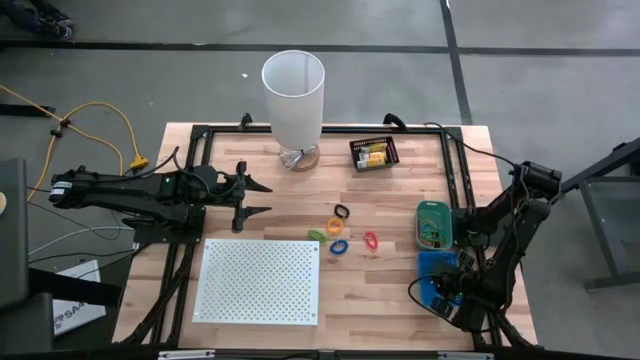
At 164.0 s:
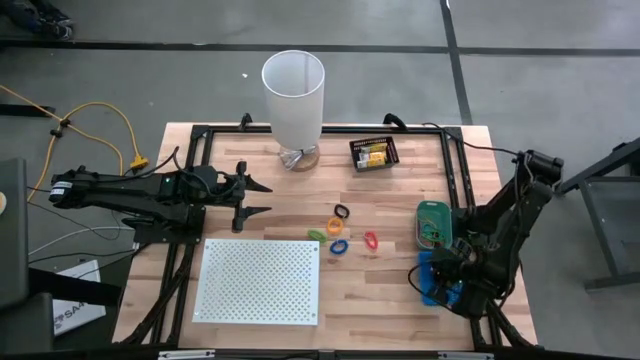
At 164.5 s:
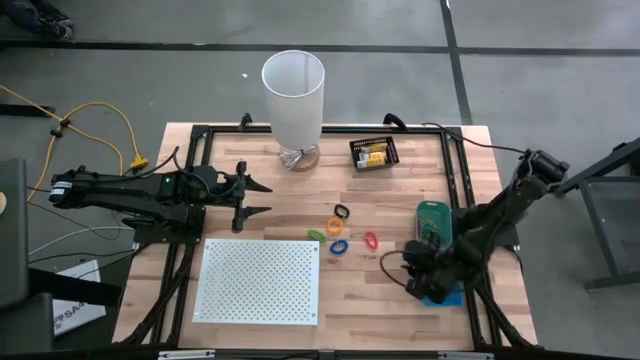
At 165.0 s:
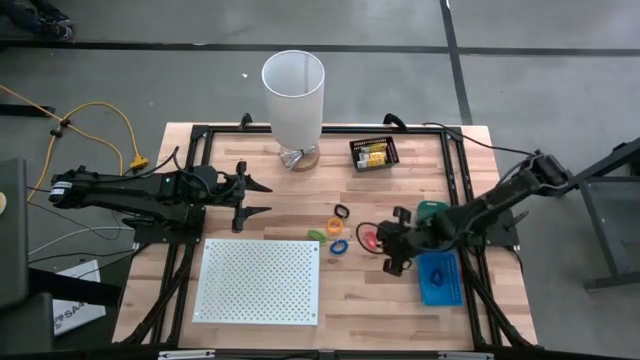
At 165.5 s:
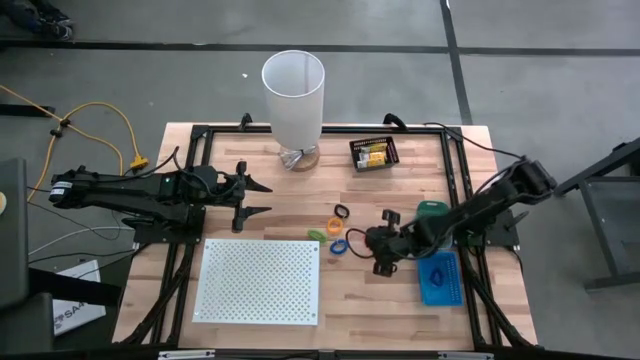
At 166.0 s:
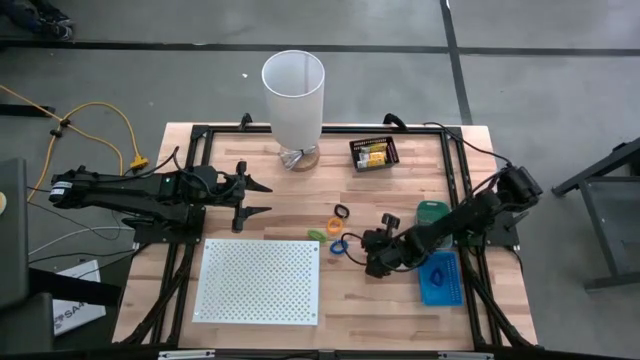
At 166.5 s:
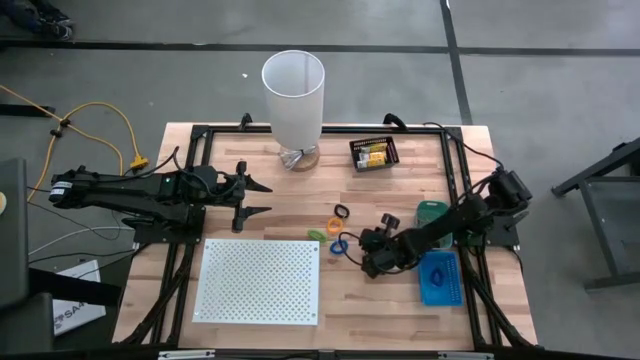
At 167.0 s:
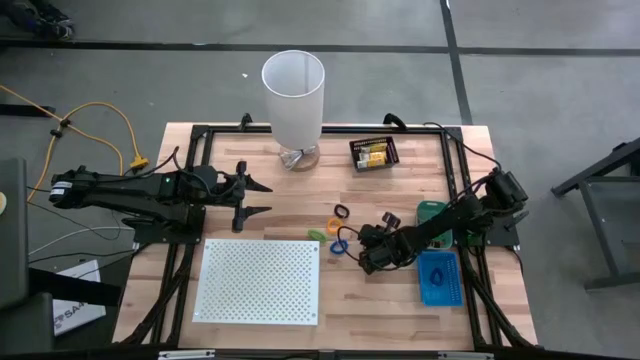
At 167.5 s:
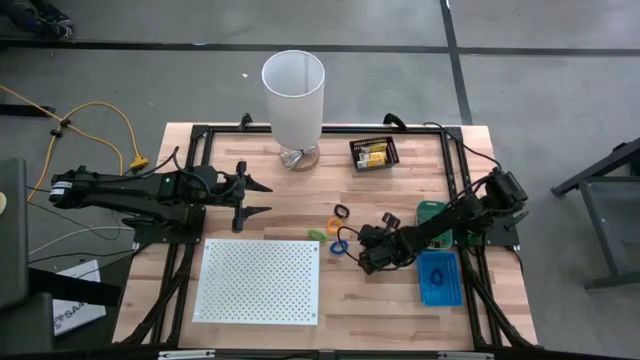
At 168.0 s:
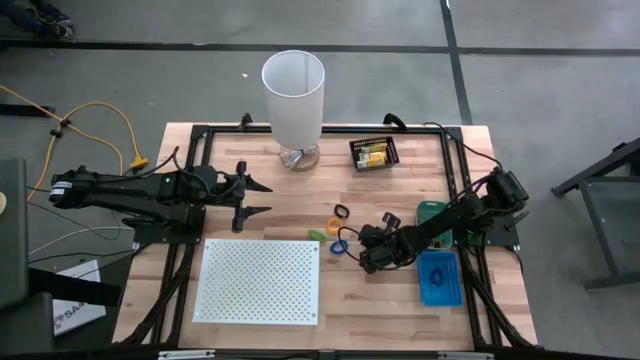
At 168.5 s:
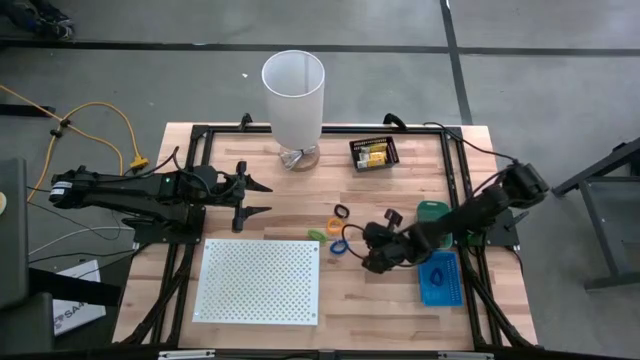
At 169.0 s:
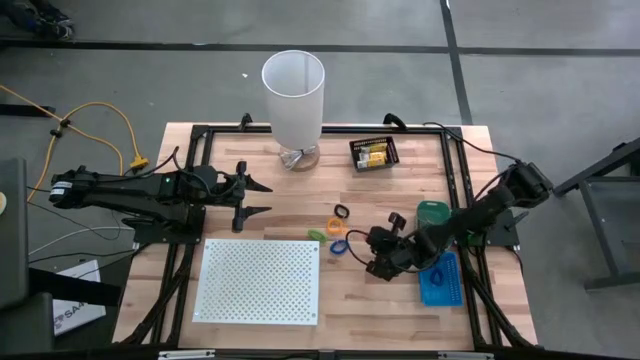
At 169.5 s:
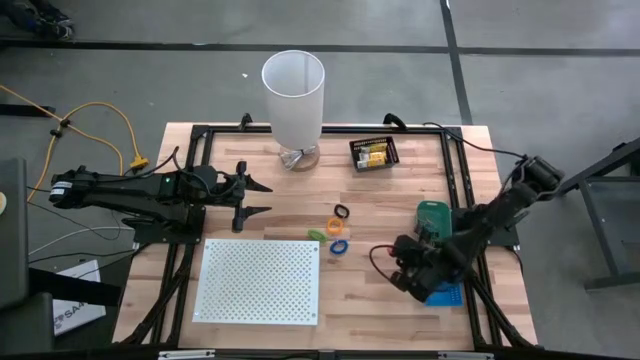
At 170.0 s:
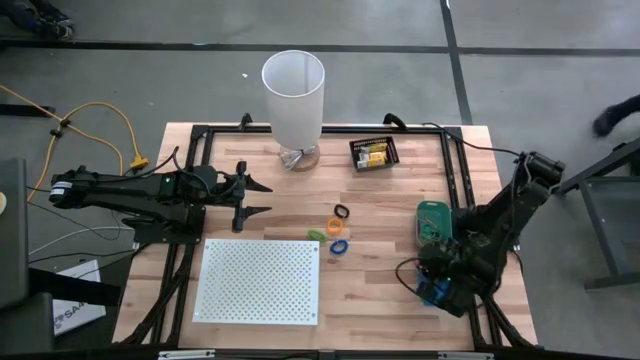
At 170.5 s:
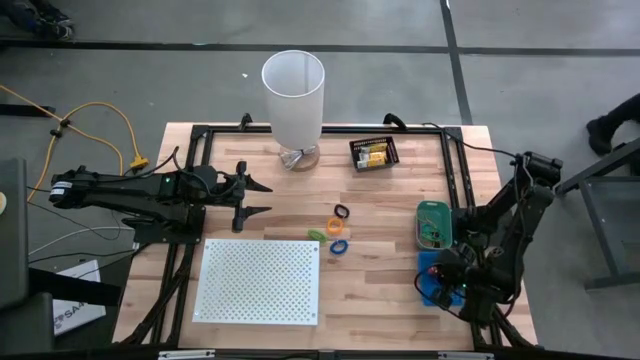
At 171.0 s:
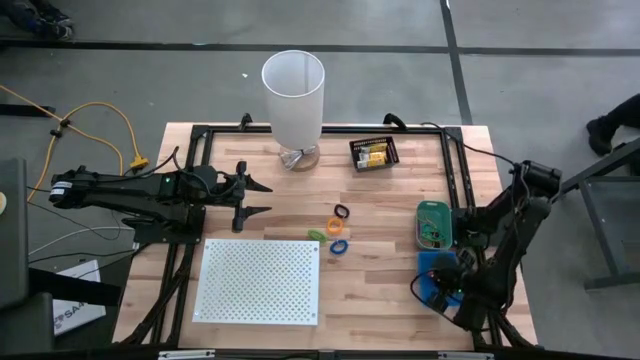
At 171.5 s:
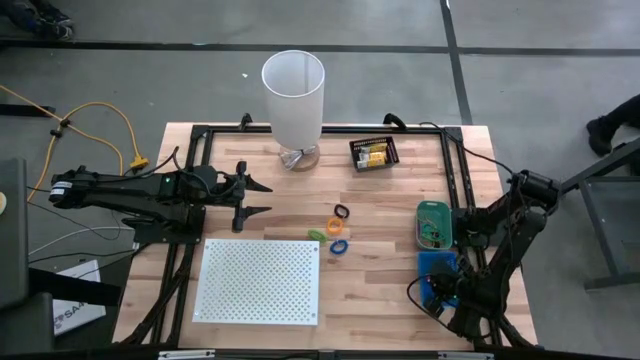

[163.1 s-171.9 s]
Task: Pick & Place Office Desk Supplies
Put the orange spring keychain into the blue bin

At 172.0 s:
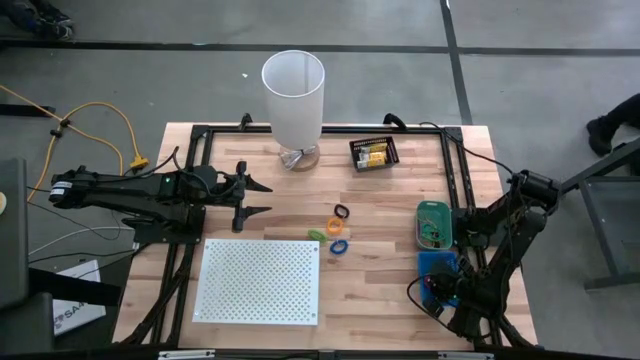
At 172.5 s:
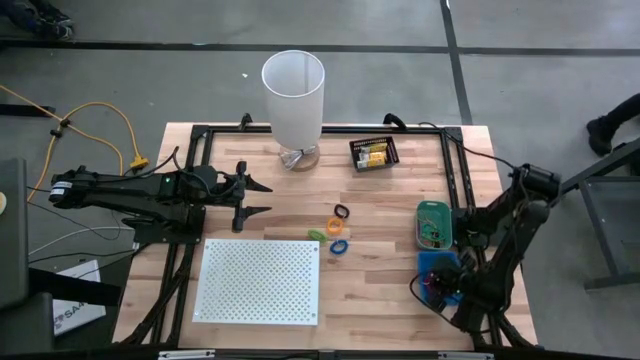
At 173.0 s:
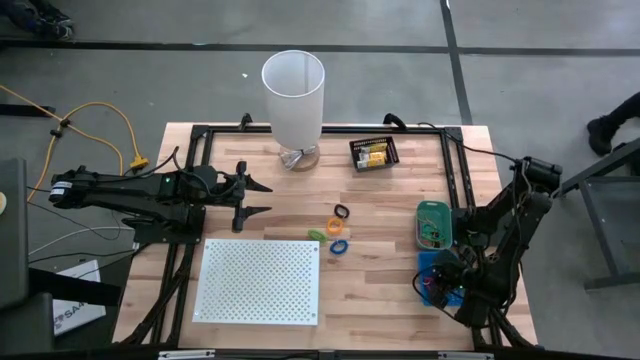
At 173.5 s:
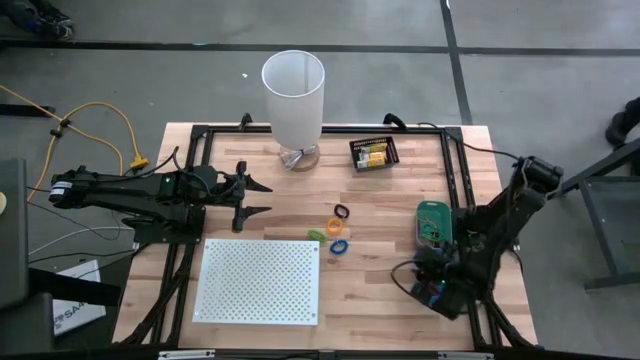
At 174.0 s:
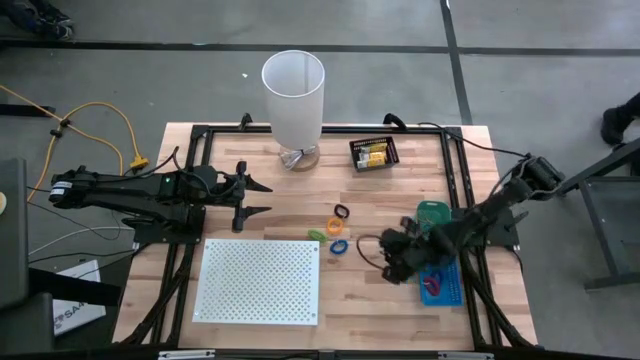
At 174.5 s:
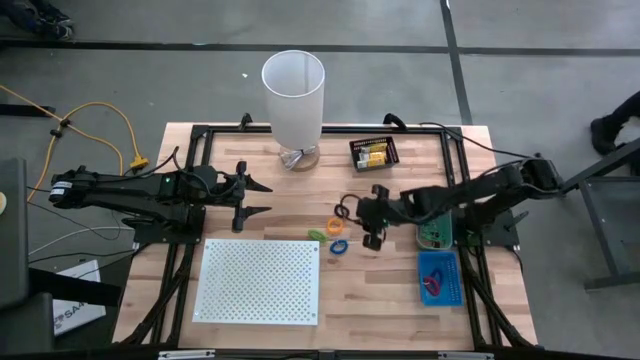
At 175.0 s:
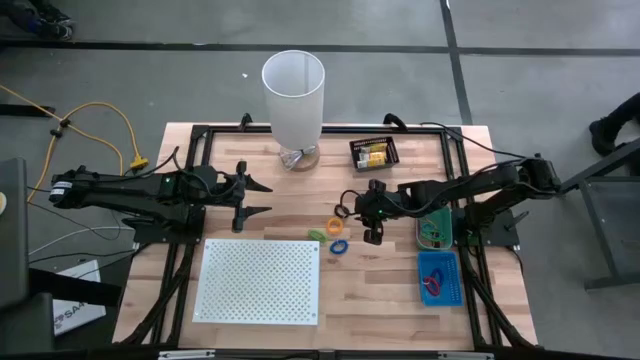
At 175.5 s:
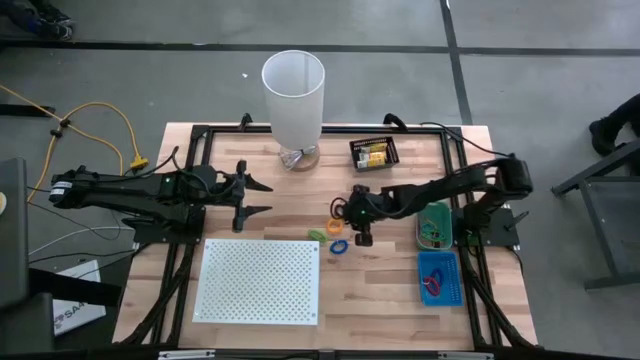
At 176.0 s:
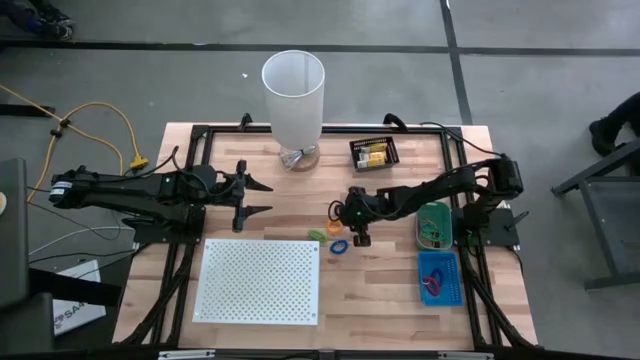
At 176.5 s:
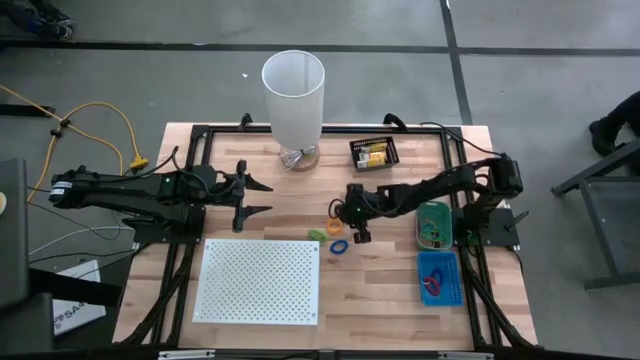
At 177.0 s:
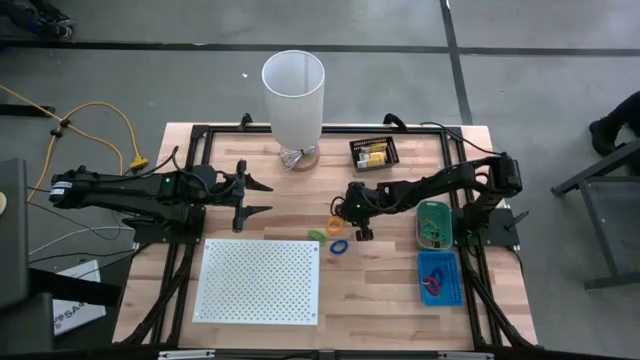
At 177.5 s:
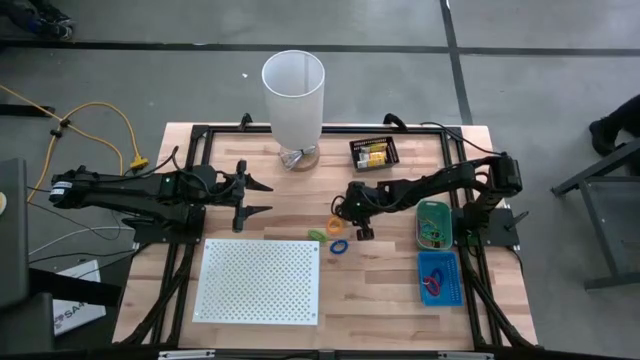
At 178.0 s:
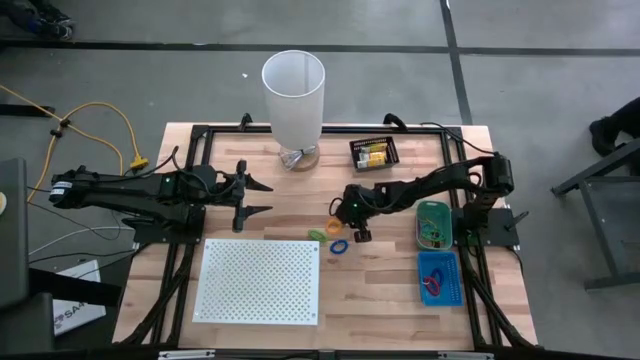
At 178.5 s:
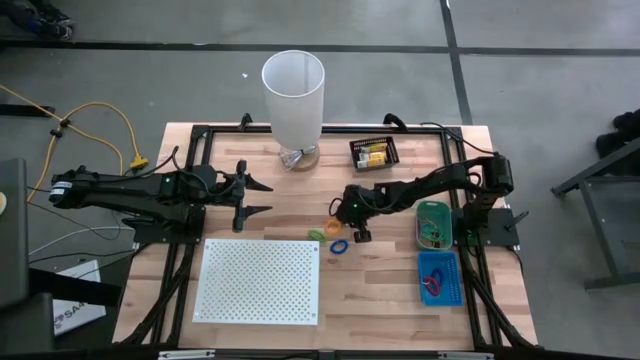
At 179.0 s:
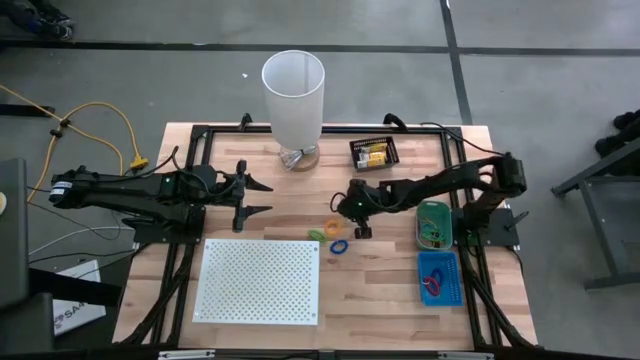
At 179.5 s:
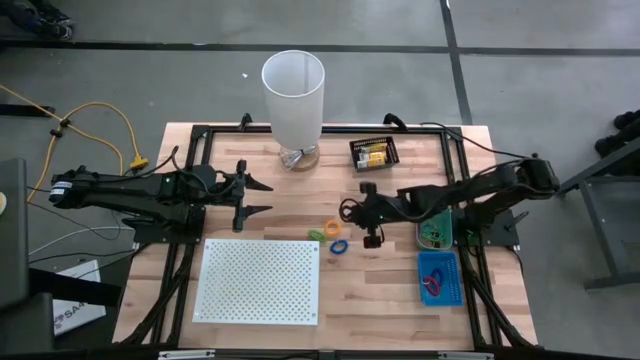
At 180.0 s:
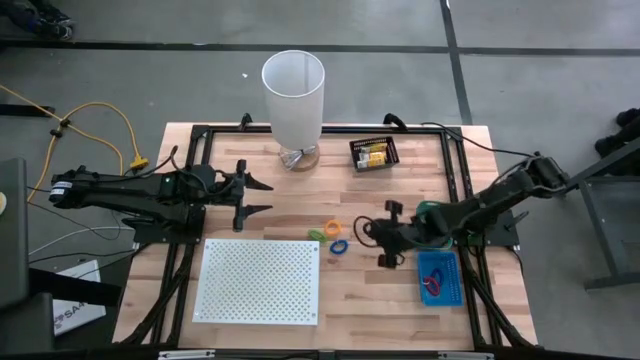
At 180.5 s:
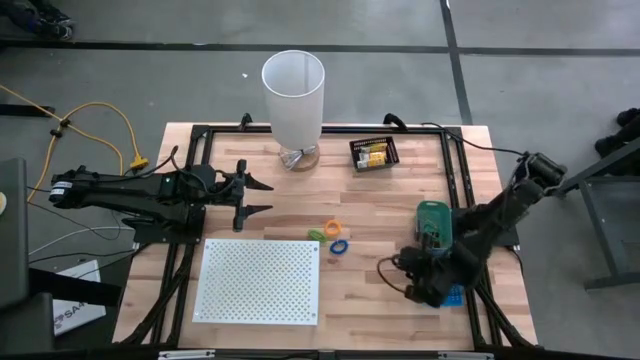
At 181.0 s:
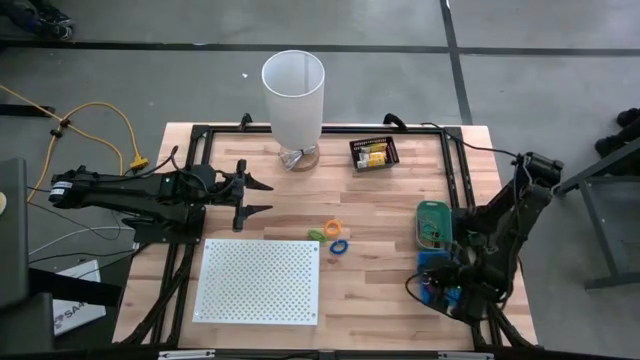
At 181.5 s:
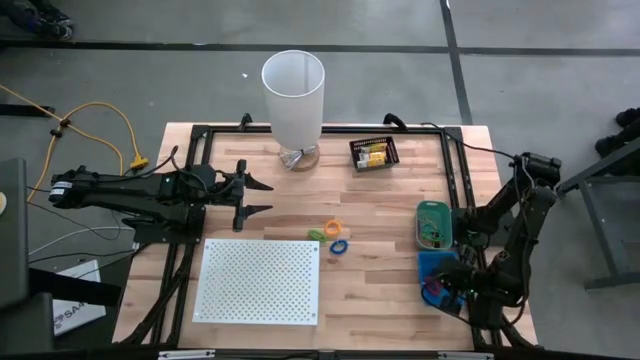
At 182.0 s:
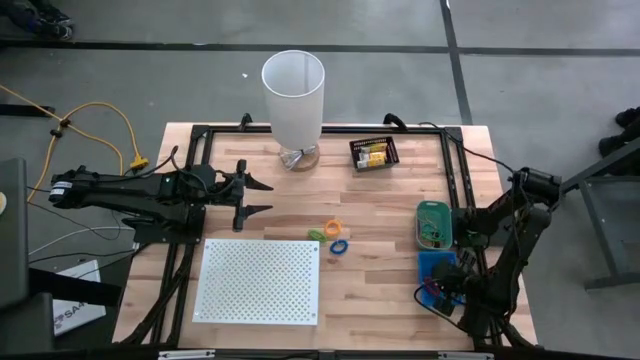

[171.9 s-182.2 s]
Put the black spring keychain into the blue bin

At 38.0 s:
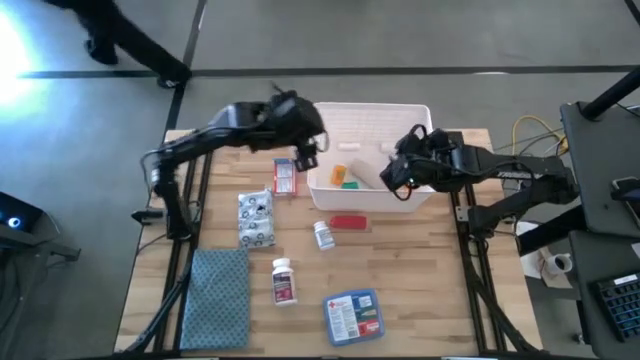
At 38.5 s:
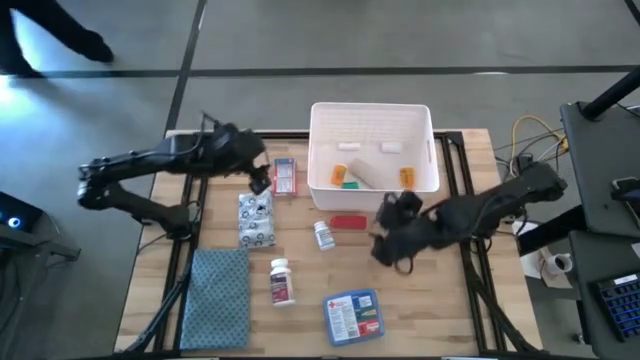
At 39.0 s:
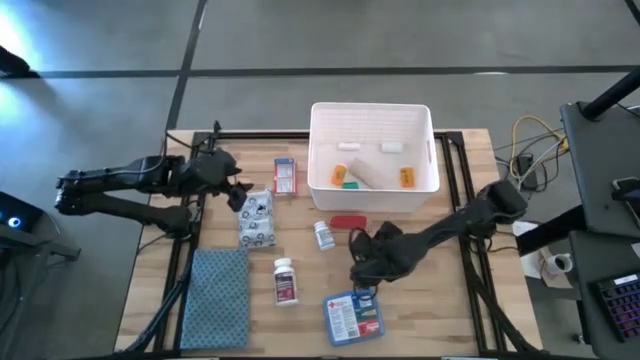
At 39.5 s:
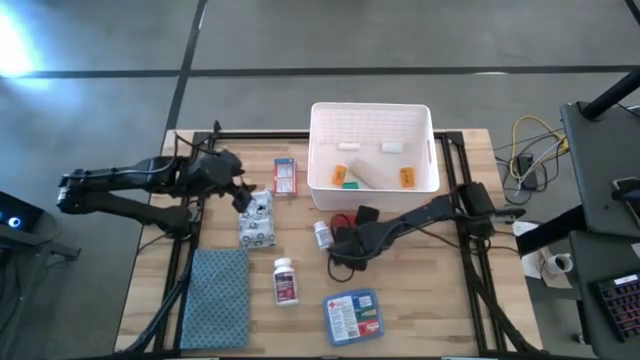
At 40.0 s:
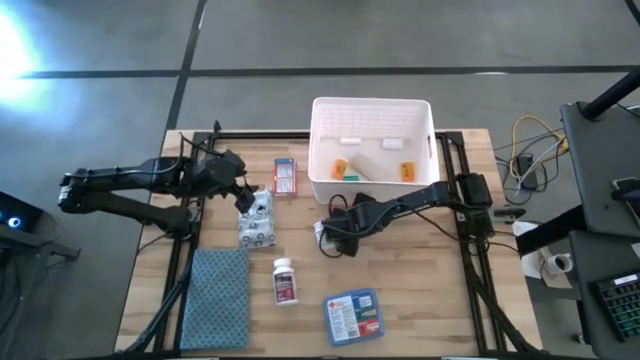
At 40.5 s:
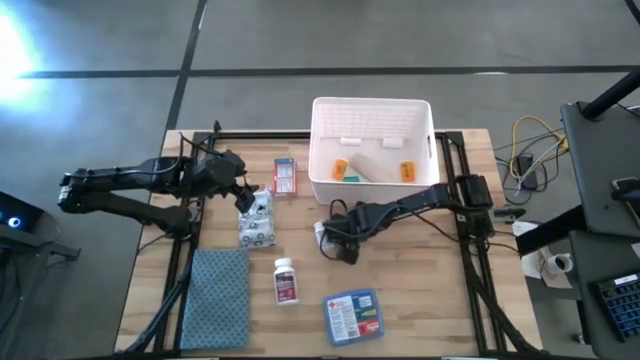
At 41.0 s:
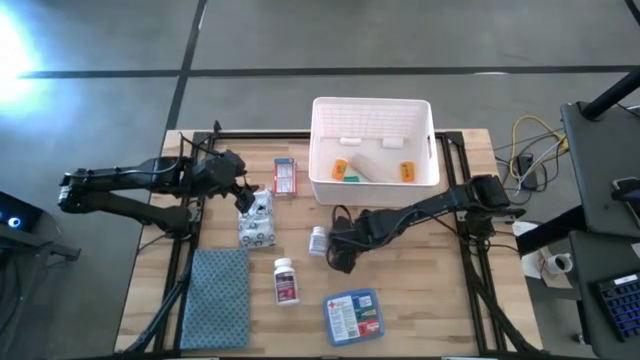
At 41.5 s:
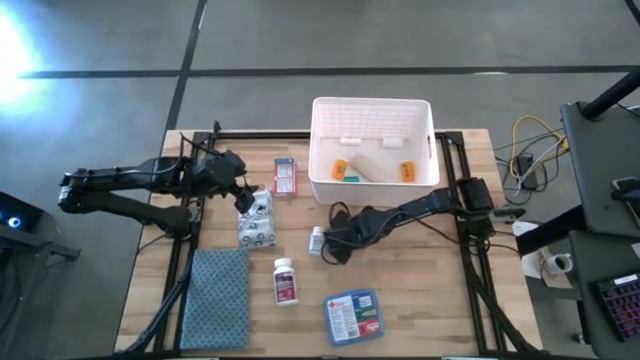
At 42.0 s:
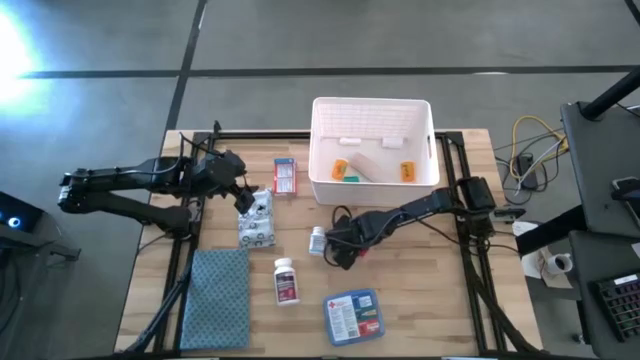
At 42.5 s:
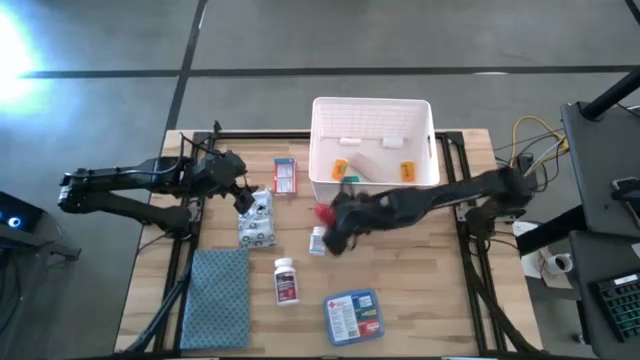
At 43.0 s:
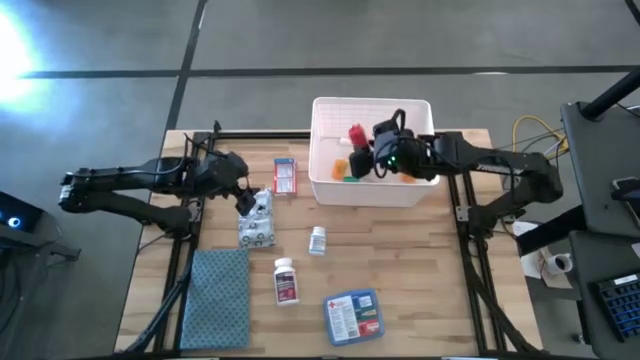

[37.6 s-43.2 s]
Task: Pick & place medical supplies in basket/bin
Put the red bandage into the bin
